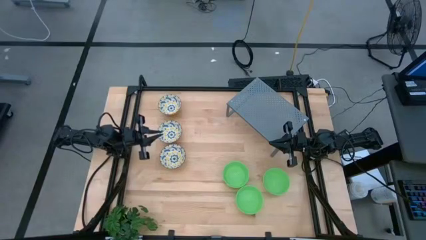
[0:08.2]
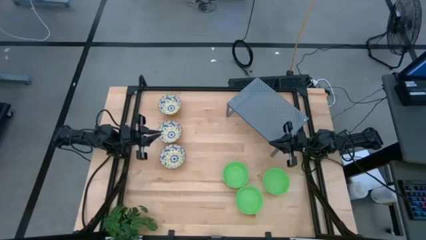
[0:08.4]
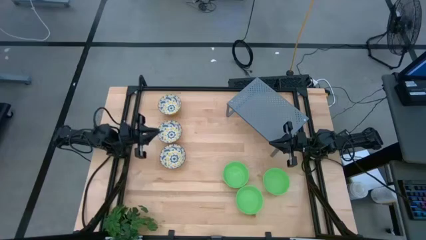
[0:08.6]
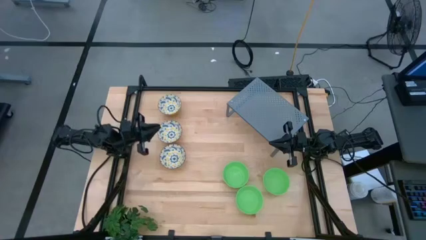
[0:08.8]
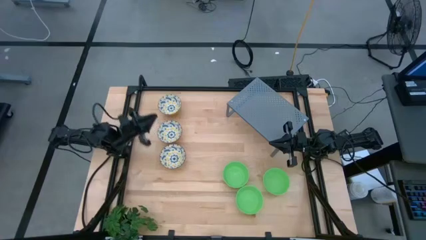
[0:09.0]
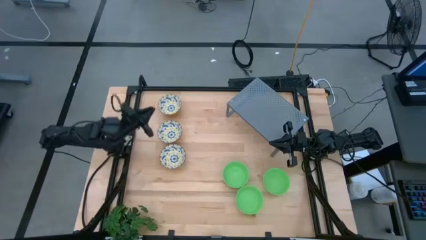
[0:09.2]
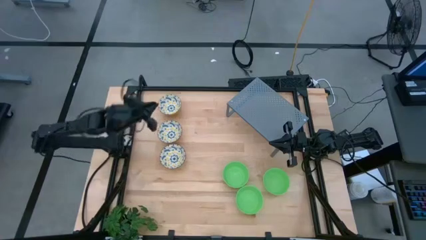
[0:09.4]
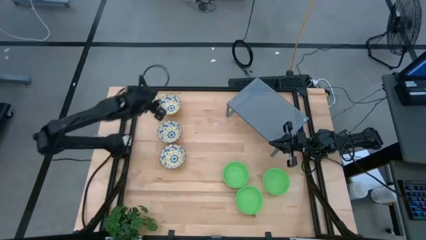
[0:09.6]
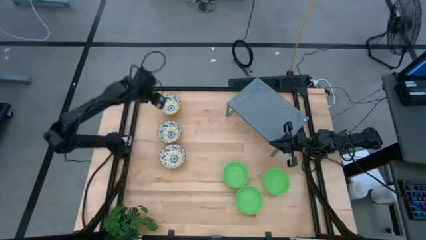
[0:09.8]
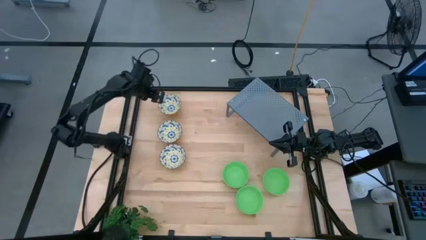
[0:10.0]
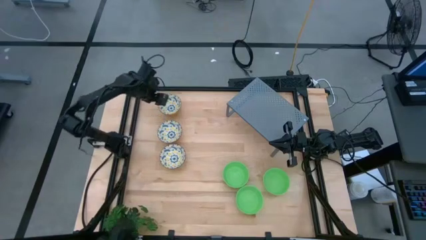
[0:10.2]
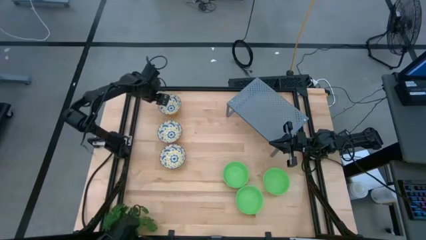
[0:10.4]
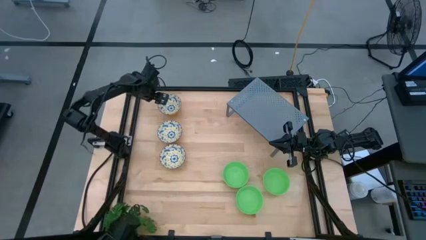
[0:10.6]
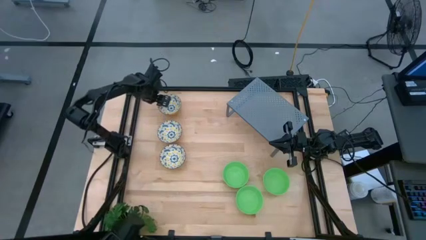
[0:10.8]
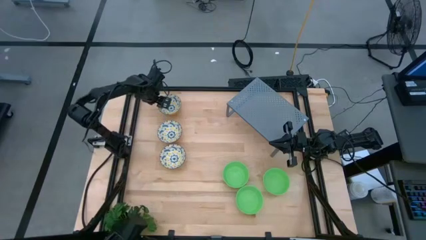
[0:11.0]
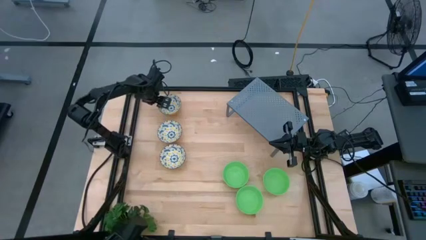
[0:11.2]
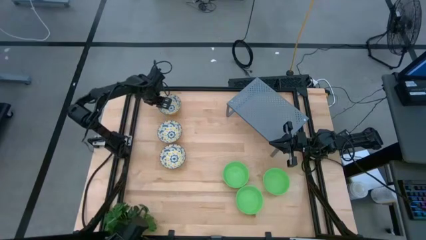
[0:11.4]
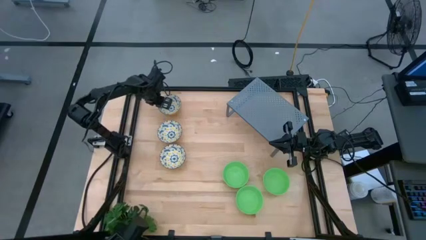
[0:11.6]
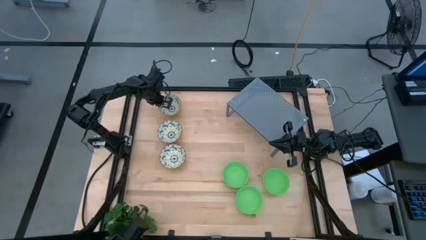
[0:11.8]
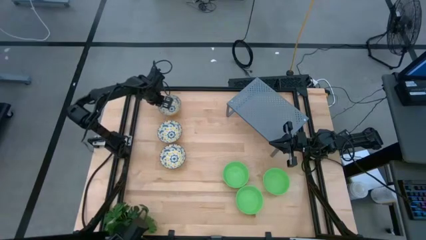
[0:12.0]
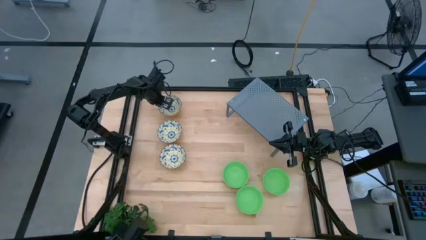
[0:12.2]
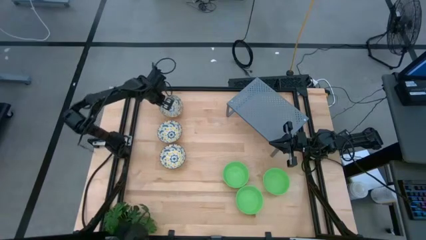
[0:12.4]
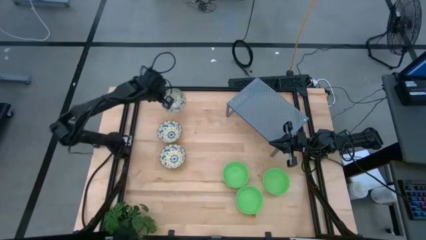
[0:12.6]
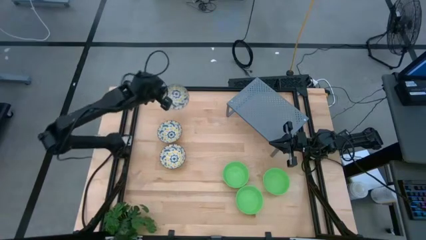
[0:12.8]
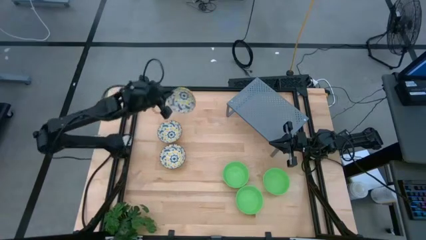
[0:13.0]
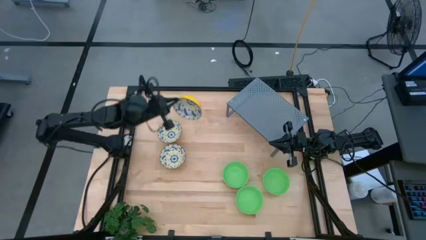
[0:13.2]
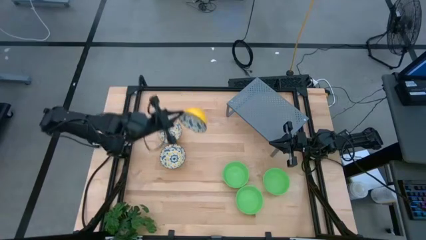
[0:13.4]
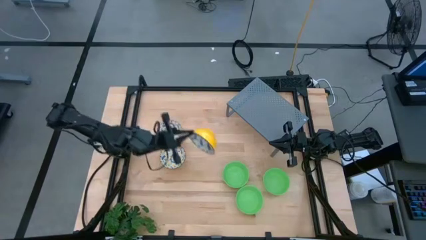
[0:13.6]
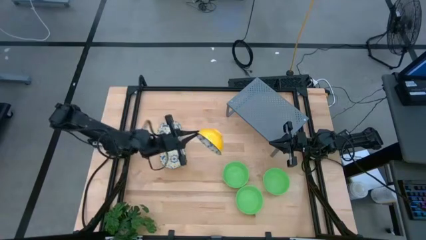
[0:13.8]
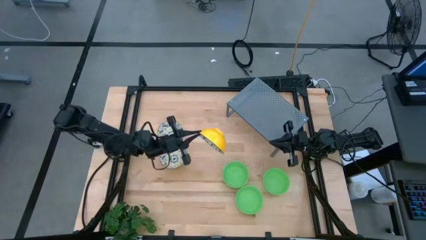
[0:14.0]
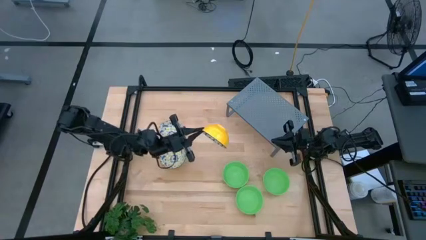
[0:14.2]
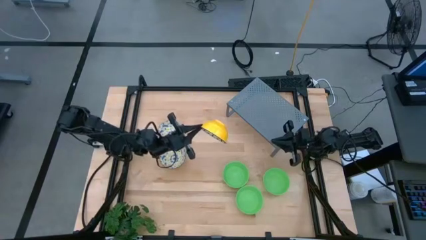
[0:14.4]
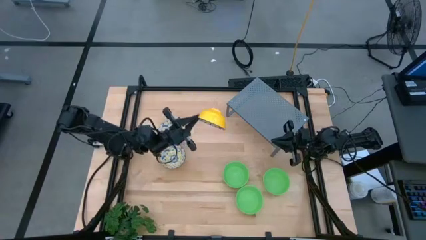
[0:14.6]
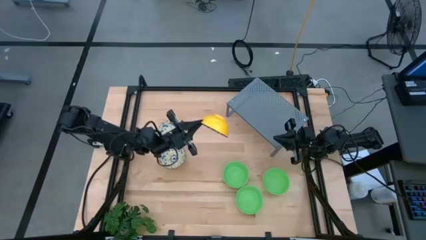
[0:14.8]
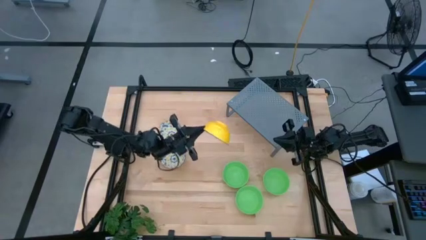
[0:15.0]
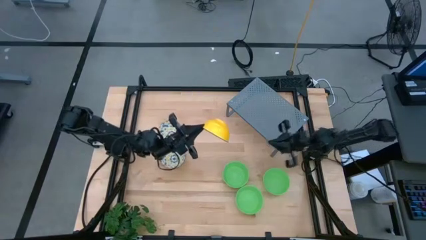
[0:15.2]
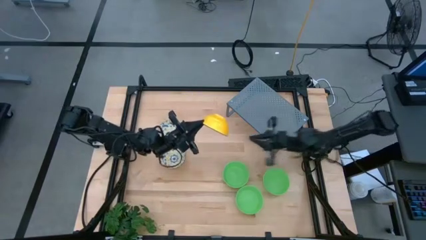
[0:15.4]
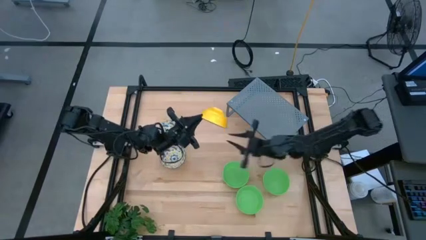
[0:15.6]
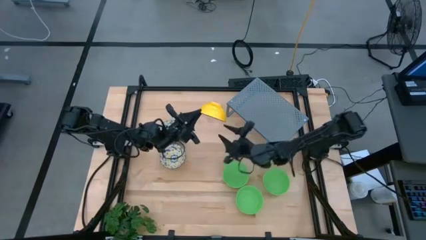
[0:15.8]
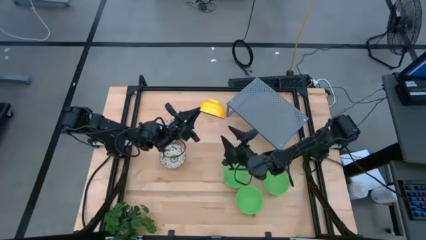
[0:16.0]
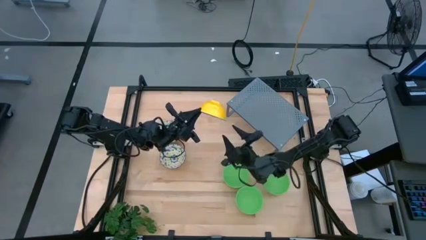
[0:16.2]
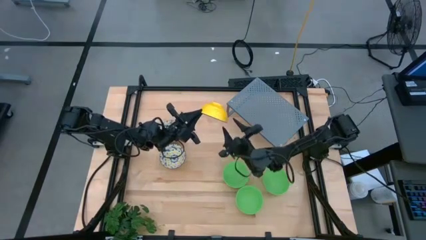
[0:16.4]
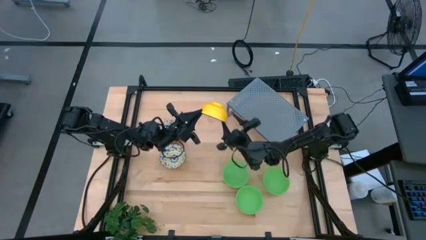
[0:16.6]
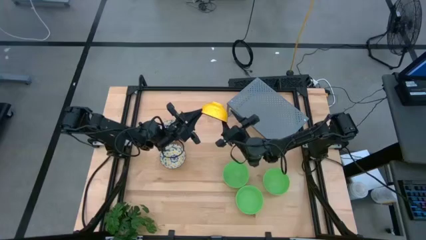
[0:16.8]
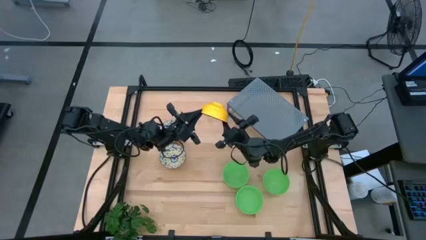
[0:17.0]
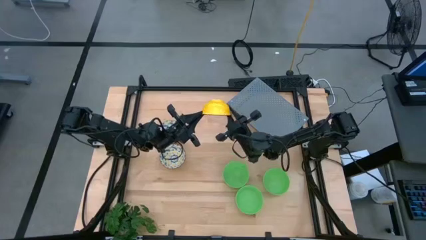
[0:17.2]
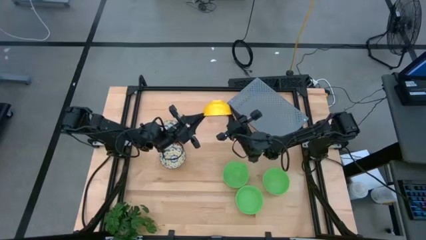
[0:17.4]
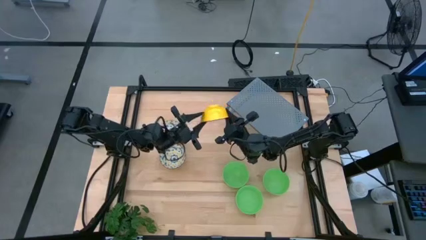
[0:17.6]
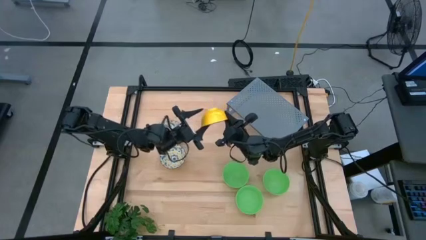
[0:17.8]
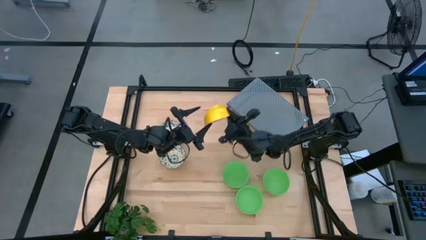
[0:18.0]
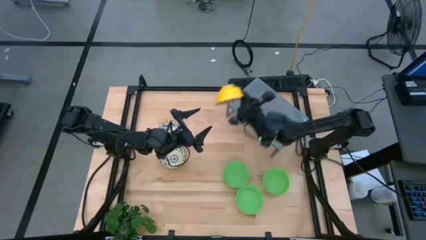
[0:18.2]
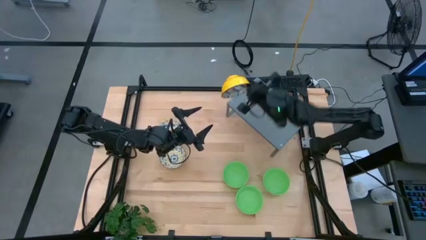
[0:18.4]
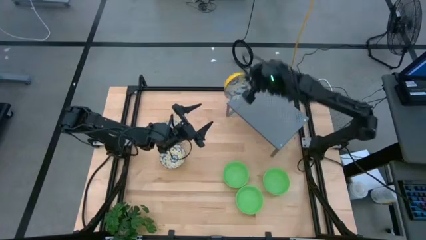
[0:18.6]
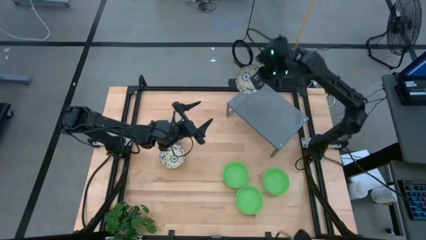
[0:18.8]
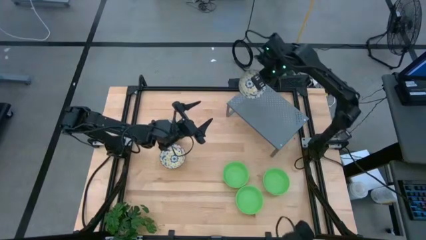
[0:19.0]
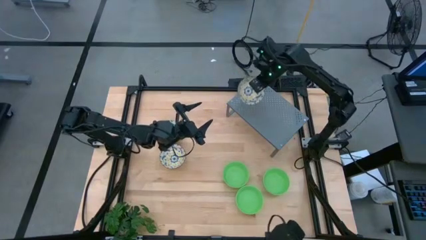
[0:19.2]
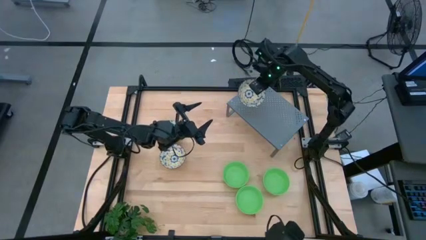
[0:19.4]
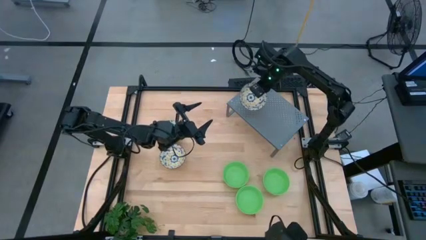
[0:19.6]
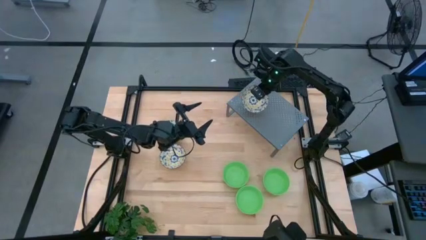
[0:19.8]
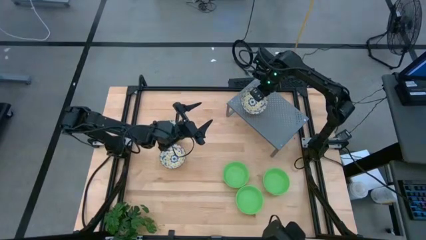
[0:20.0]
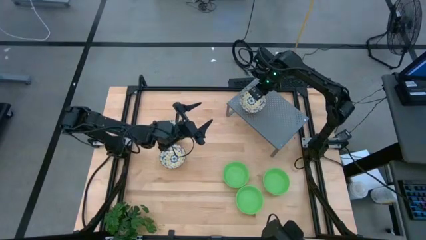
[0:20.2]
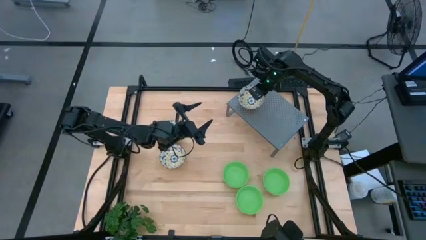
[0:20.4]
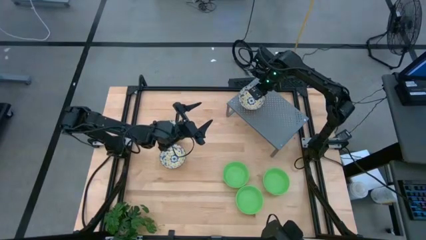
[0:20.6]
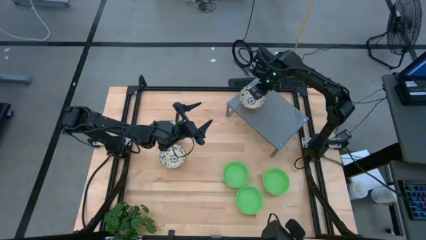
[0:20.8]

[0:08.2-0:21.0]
Task: Pick & Place Mini bowls
Put the top yellow bowl on the shelf

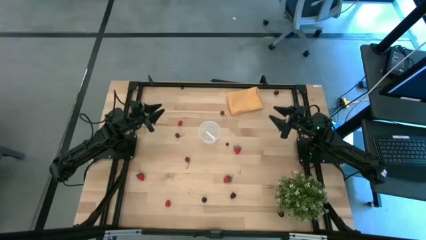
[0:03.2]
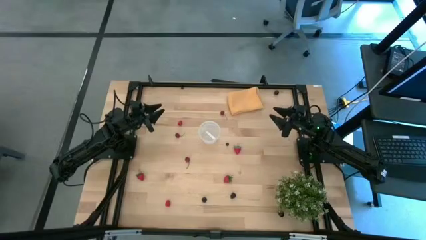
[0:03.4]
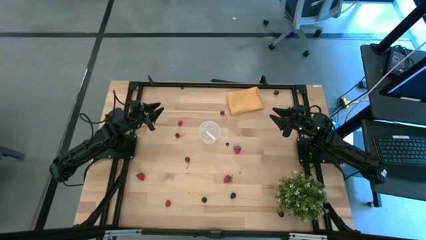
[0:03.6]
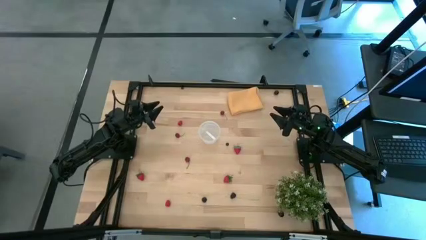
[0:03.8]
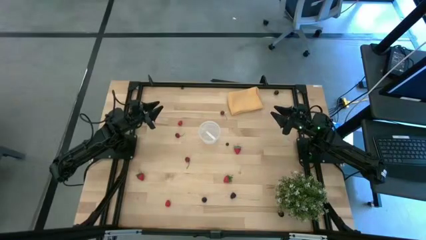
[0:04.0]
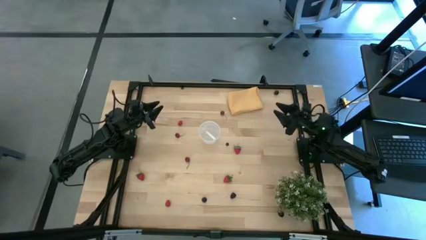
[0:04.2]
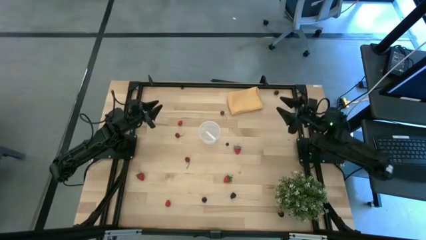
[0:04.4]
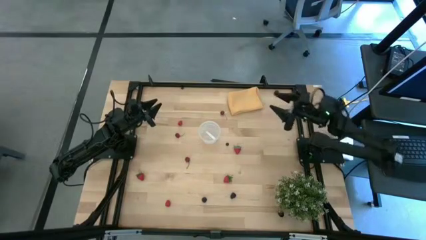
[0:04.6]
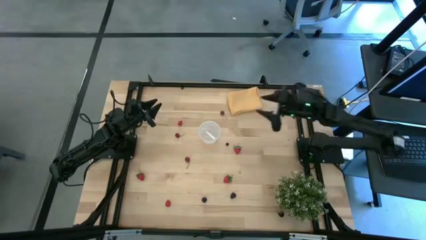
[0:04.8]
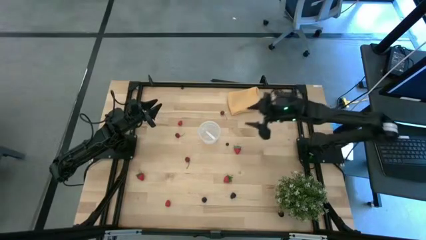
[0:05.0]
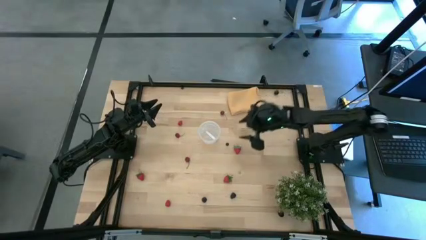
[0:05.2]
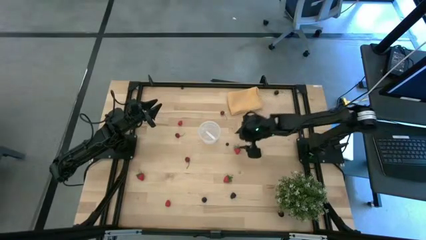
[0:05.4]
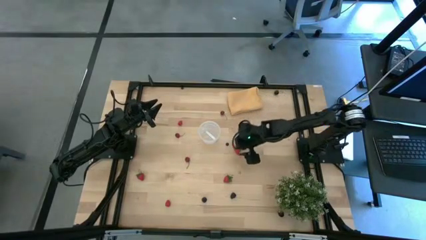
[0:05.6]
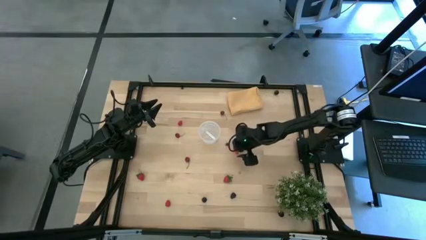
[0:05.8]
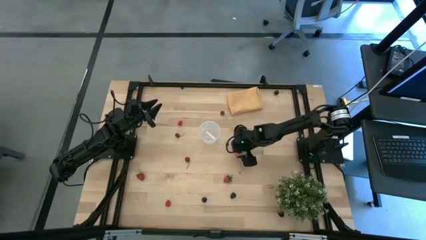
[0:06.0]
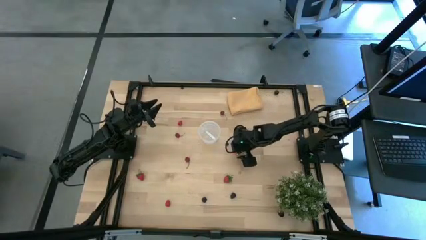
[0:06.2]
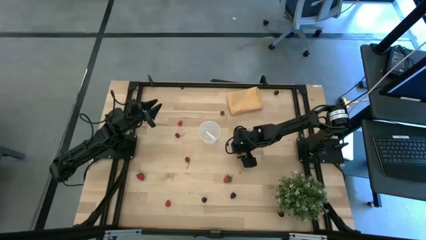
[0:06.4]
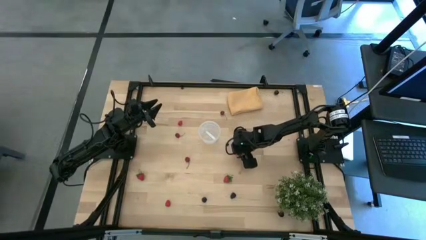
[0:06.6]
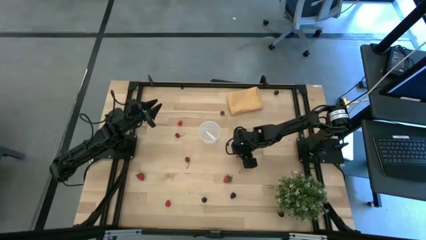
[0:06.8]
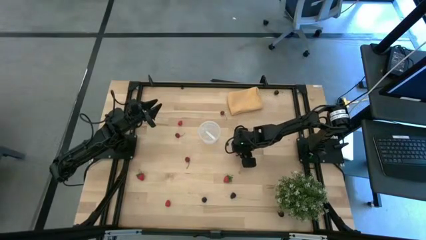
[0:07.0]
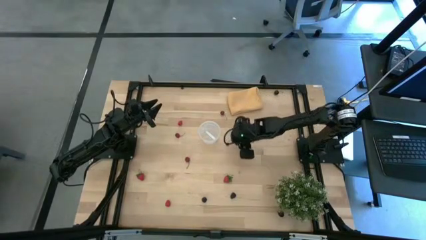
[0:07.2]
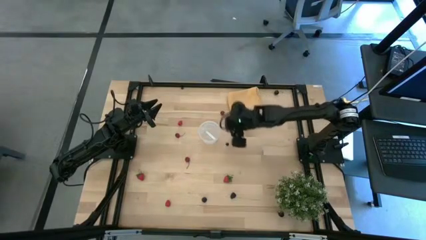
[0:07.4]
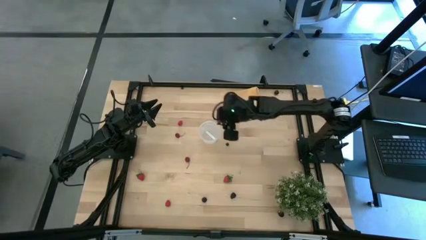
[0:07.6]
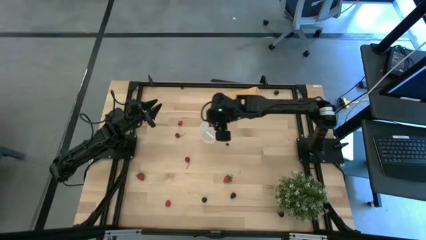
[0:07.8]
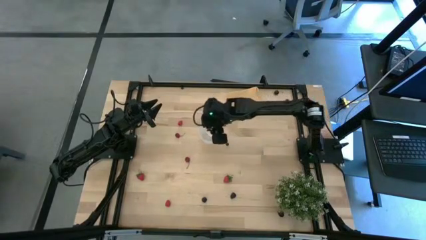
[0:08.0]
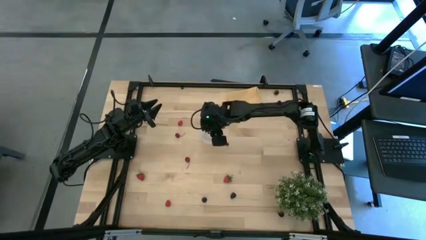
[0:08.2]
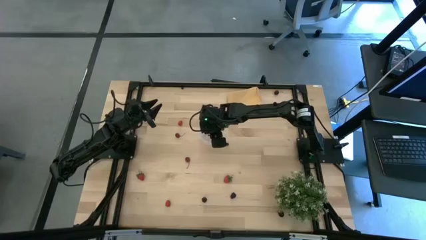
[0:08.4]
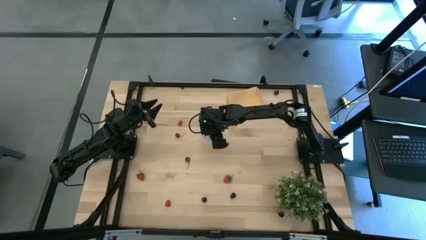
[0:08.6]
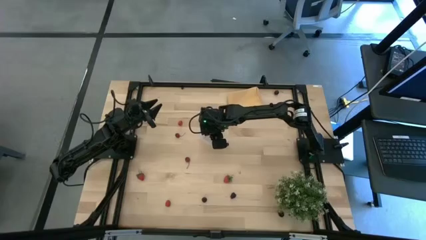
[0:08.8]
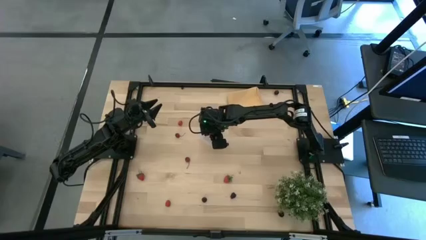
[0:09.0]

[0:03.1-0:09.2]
Task: Pick and placing Produce into tupperware
Put the top right red strawberry into the transparent container
